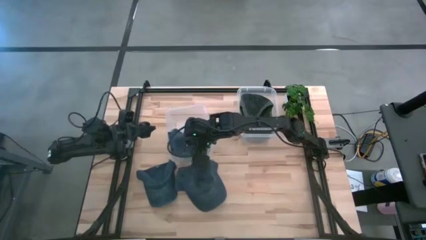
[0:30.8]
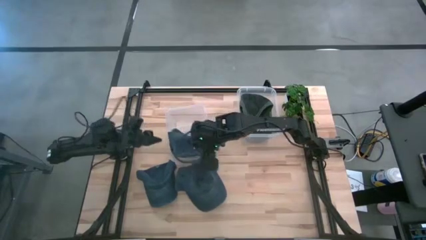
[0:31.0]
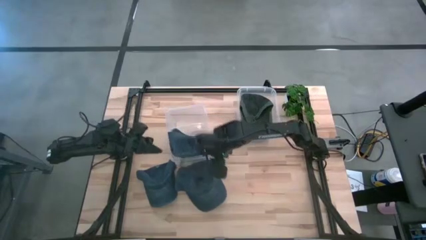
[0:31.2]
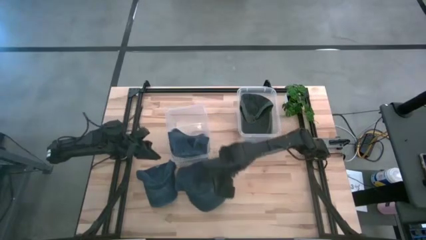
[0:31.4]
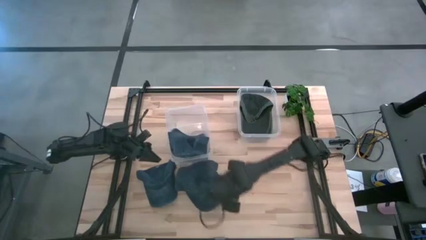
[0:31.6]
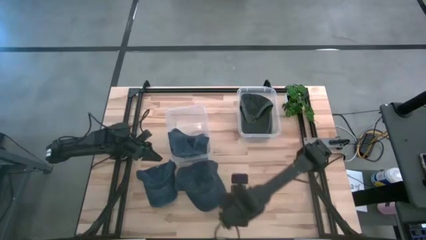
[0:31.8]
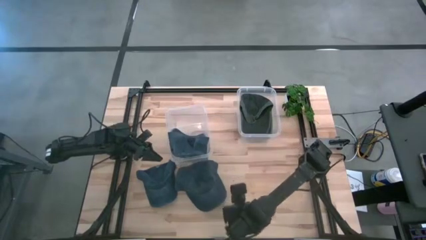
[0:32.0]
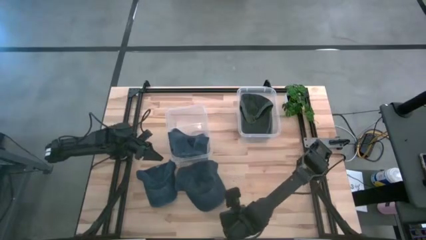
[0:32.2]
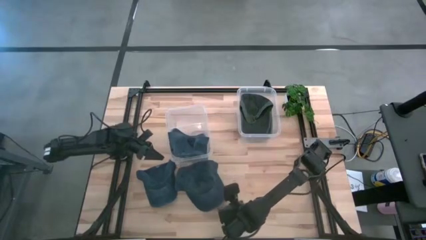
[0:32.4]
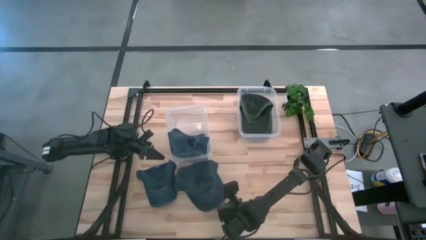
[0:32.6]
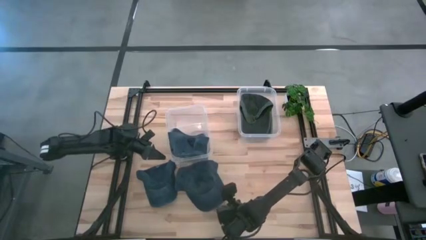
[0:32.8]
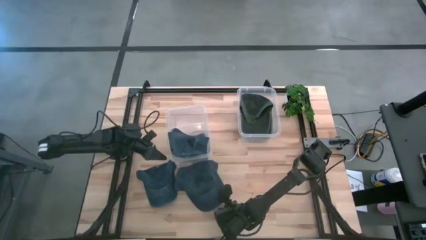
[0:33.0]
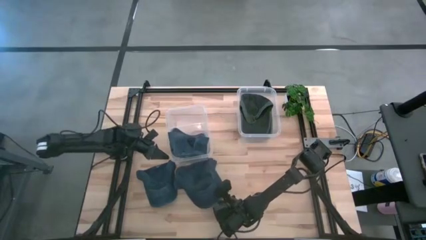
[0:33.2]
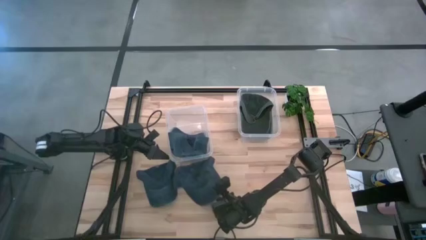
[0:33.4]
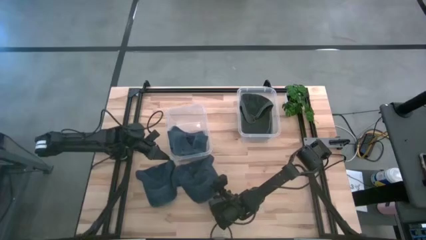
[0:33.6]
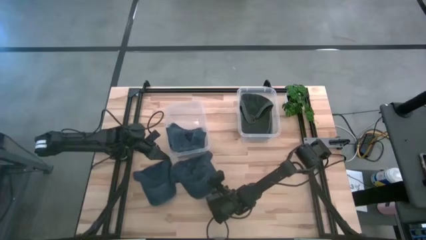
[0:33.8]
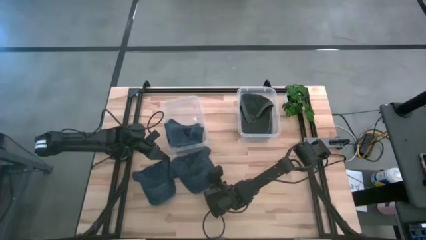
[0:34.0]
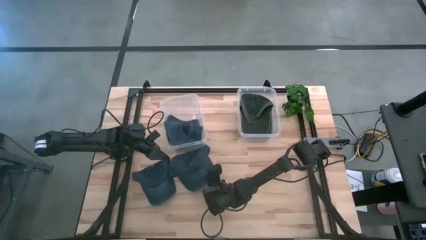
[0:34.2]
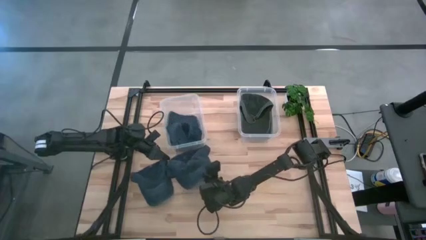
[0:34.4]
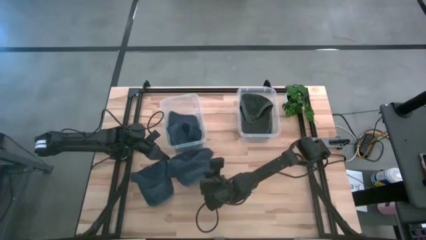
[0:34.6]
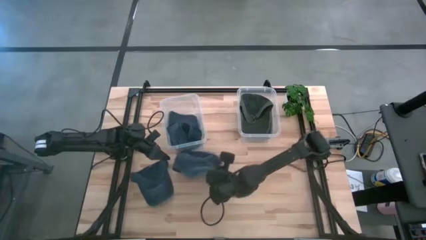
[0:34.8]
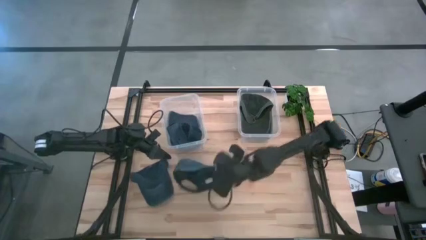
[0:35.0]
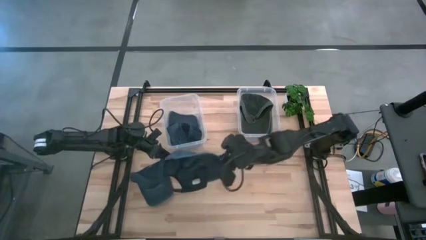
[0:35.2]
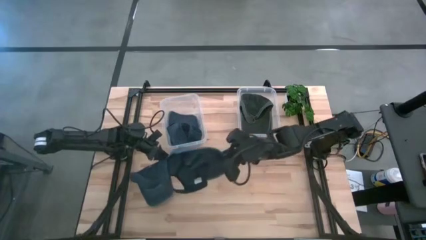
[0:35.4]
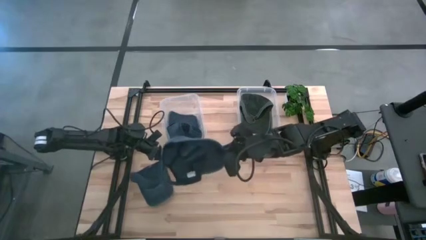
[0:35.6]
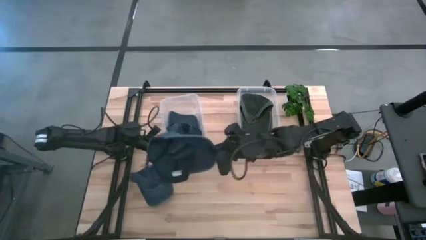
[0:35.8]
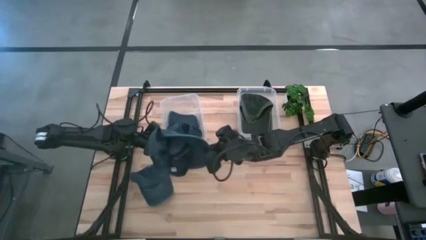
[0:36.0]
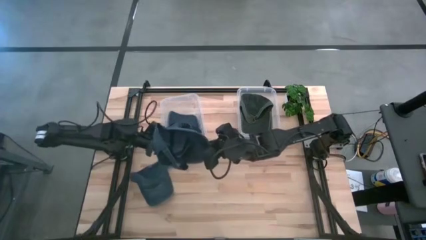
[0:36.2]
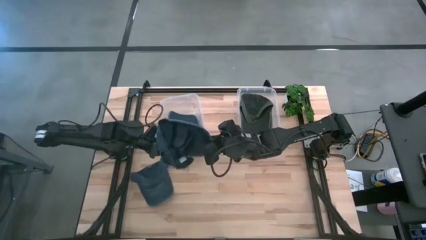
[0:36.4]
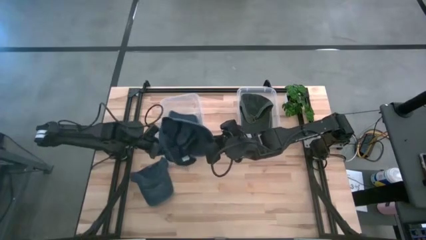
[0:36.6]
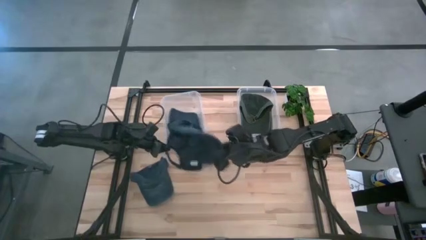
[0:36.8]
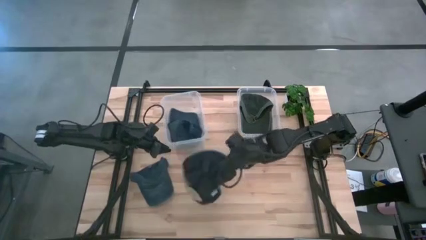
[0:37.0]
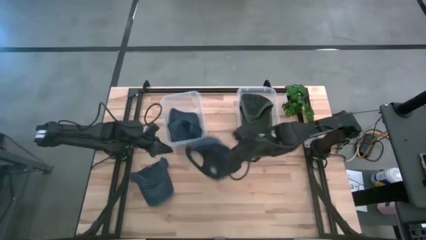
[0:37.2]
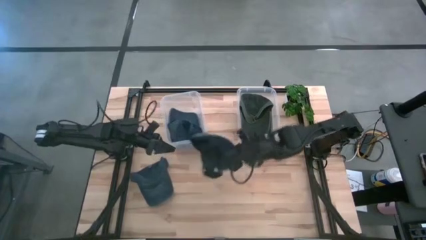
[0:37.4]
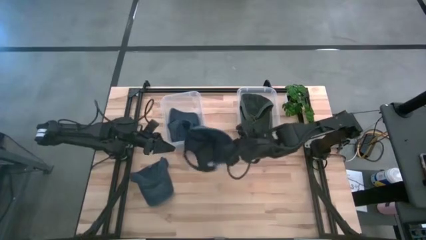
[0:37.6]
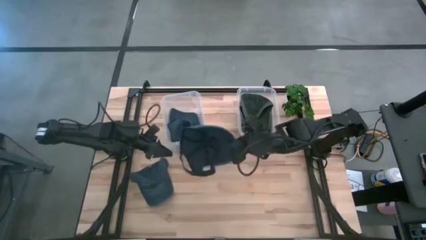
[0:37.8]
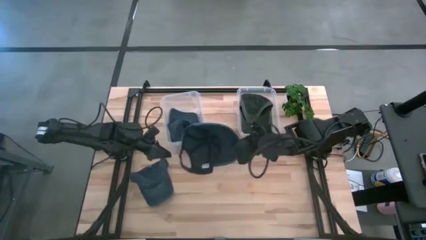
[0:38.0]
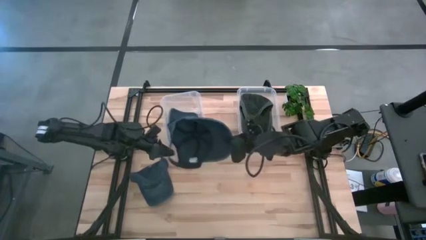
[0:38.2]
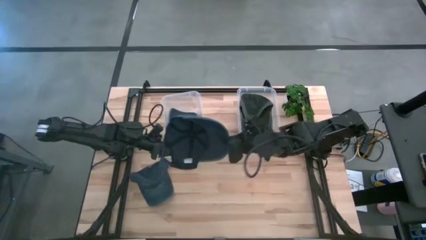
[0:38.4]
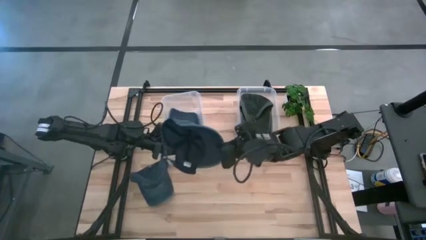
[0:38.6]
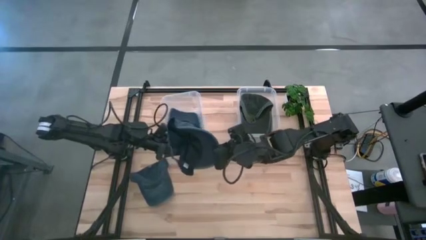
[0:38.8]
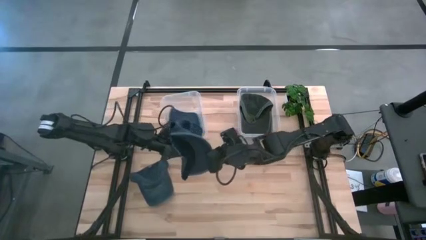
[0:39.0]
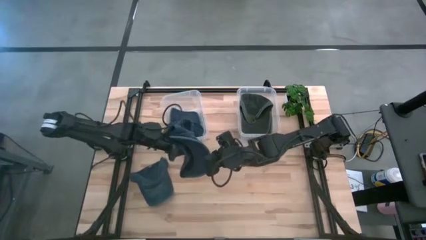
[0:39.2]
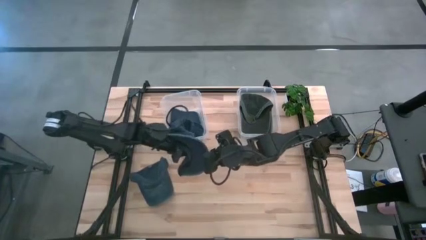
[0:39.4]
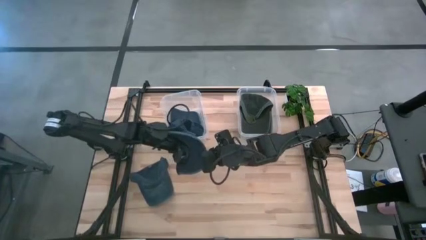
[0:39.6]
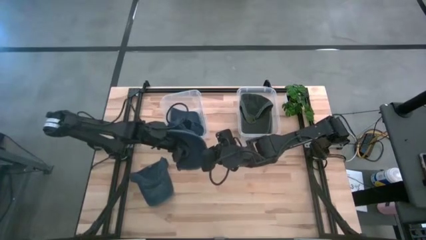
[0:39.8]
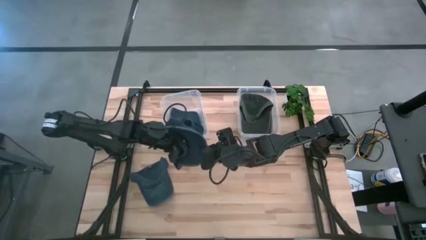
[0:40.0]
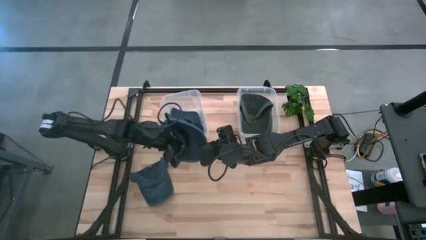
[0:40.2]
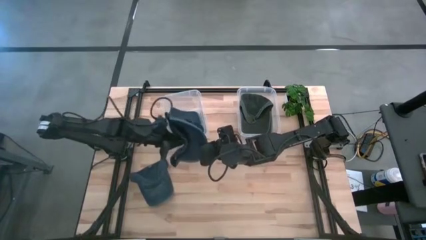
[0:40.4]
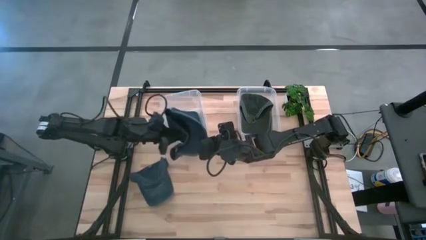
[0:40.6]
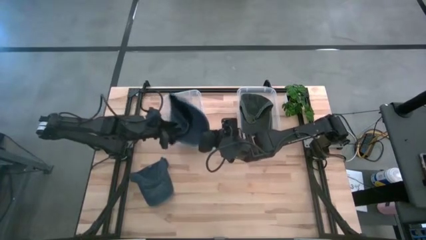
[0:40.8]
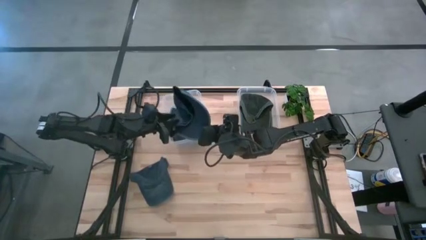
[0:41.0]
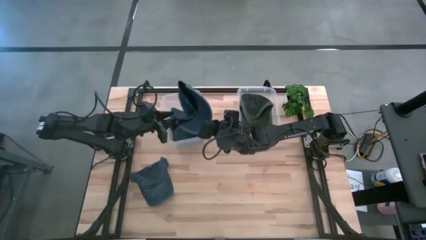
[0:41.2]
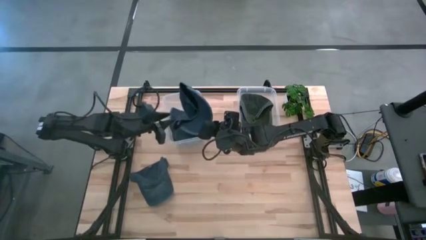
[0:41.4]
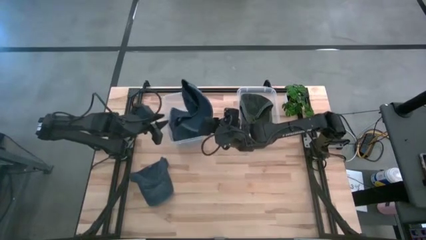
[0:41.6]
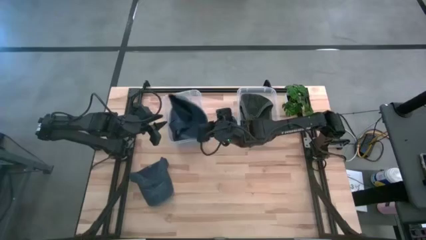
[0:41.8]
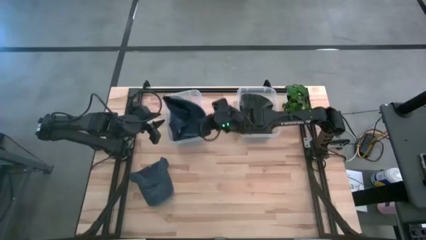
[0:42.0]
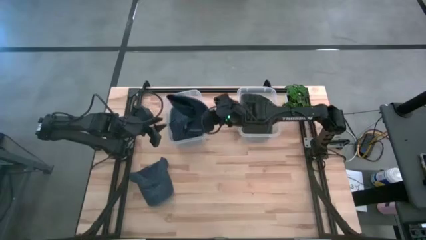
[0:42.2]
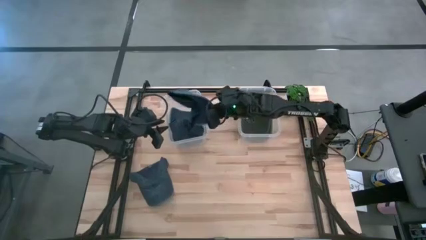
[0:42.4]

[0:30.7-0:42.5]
Task: Pick & Place hat
Put the right blue cap into the left transparent bin

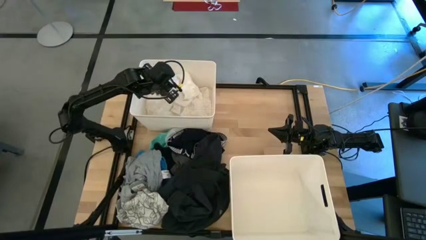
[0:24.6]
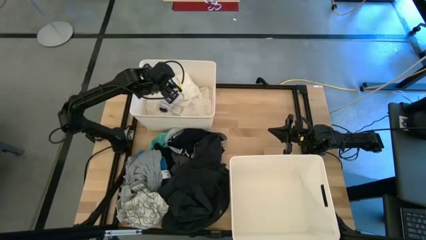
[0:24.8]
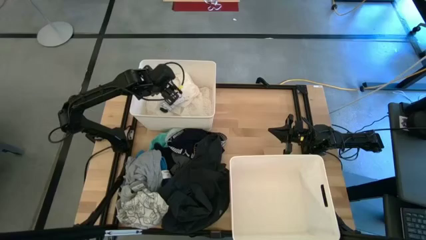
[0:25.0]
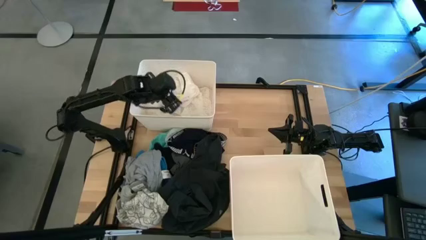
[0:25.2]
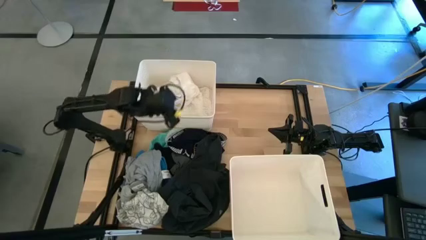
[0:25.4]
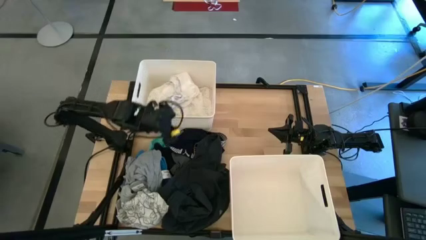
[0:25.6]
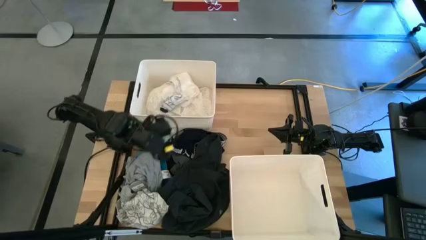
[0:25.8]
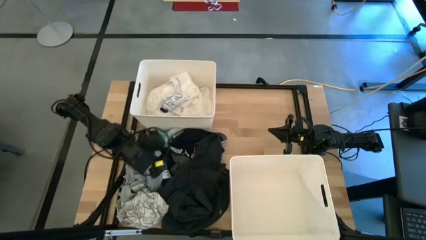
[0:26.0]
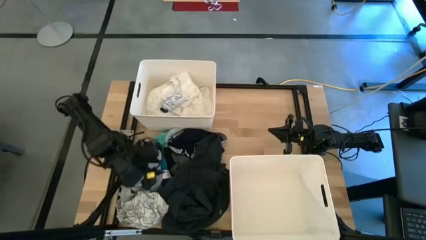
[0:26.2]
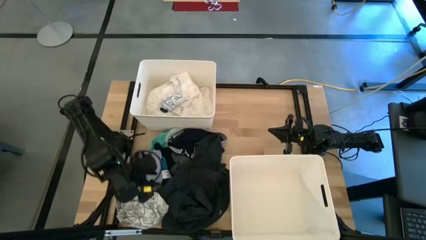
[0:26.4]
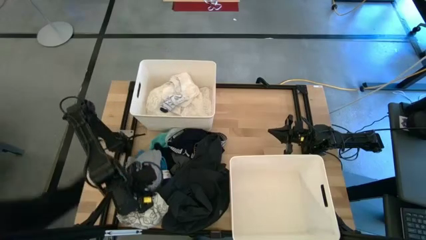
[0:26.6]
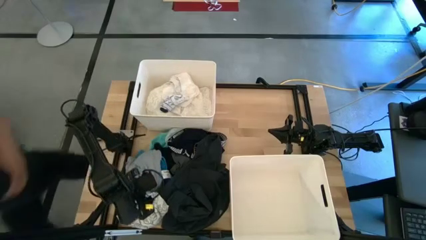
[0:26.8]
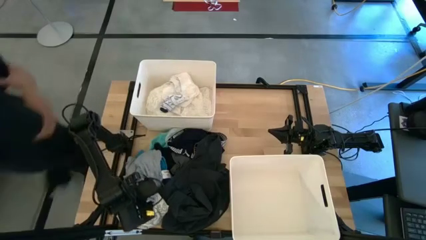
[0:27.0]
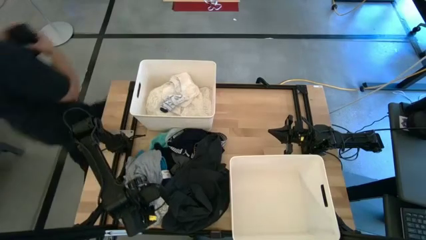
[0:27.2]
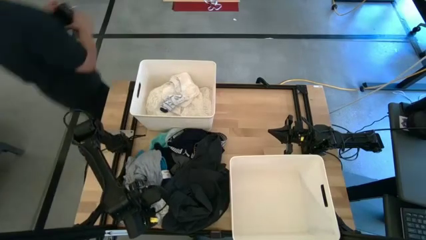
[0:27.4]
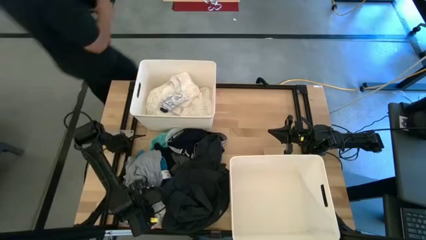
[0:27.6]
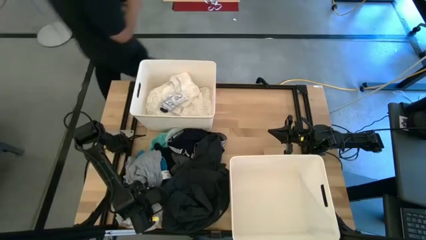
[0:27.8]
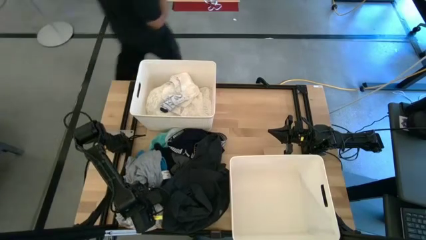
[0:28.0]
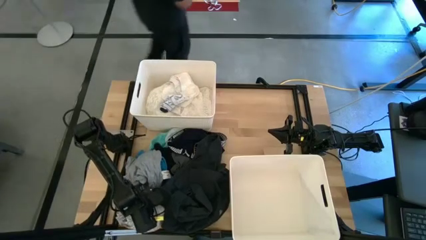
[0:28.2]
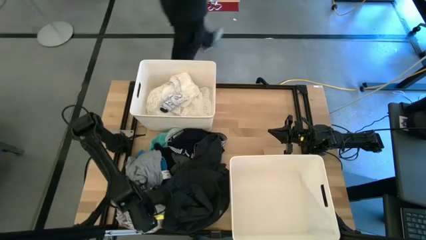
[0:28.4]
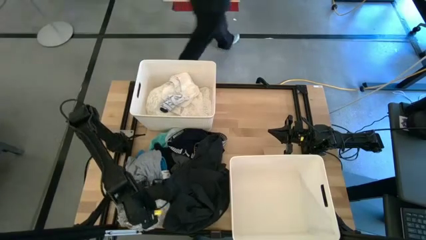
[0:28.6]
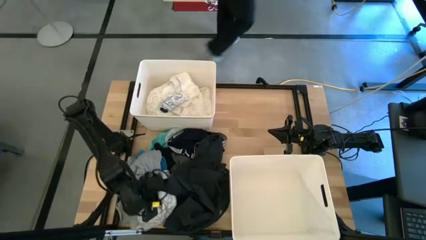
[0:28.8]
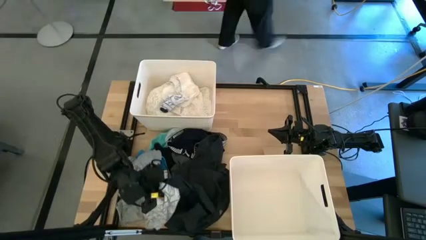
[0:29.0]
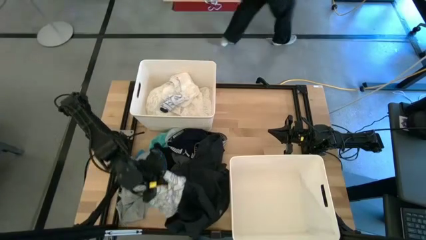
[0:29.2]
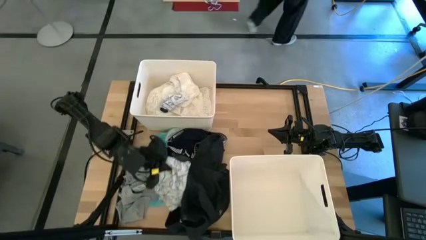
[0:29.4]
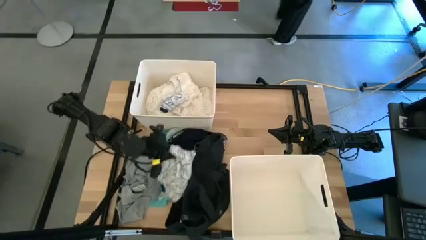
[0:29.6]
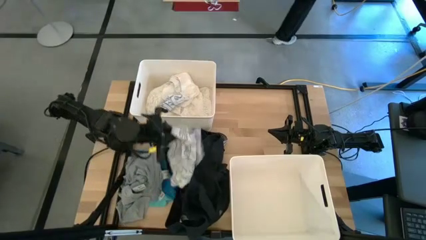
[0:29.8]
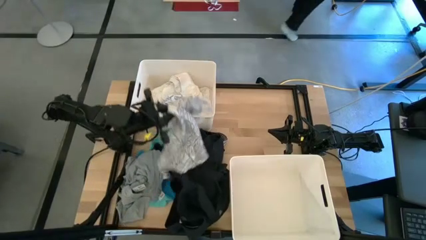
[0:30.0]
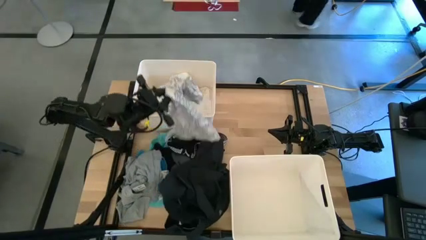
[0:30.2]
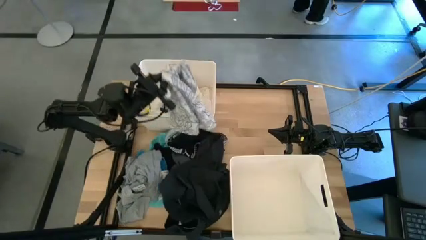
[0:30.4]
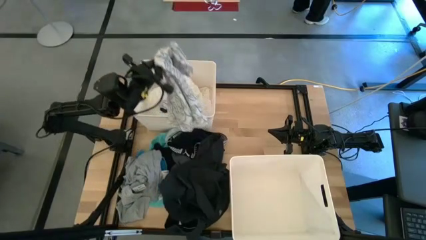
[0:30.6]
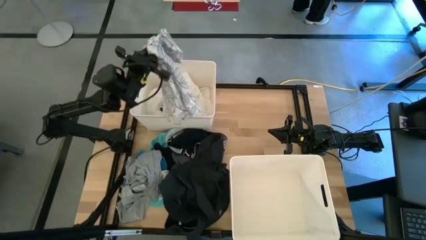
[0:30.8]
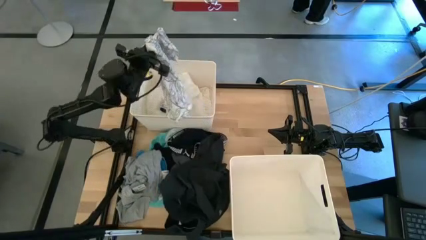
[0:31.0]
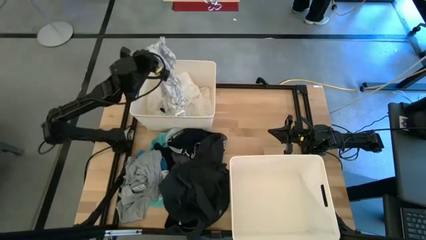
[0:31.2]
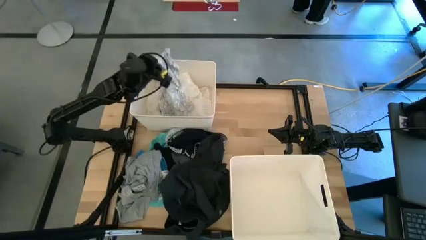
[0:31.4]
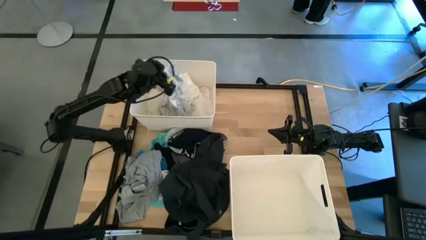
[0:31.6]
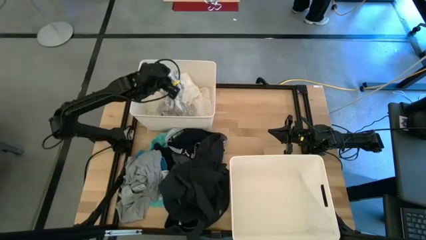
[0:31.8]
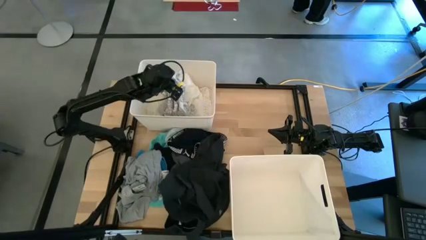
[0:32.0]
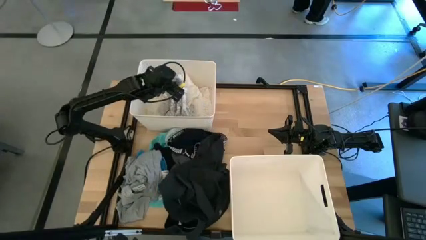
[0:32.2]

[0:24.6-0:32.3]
Task: Sort clothes
Put the striped shirt into the top left laundry bin
